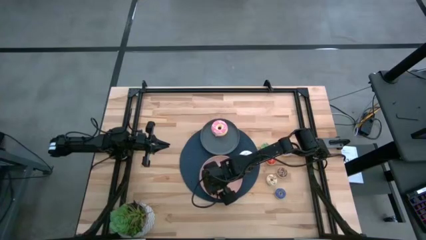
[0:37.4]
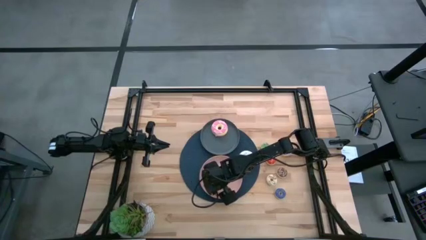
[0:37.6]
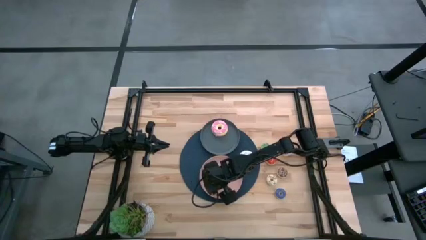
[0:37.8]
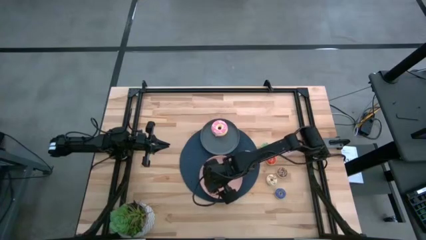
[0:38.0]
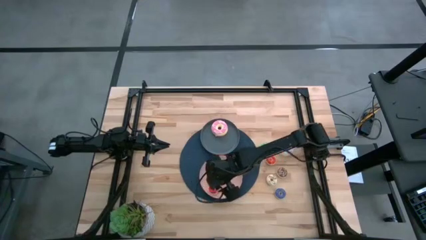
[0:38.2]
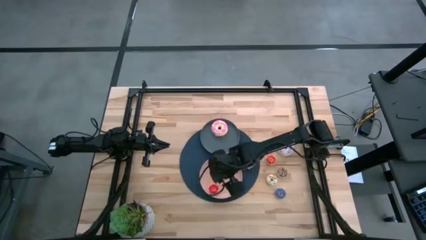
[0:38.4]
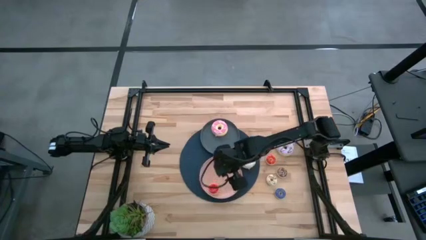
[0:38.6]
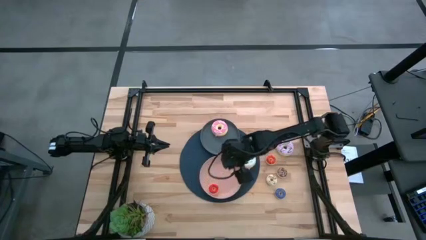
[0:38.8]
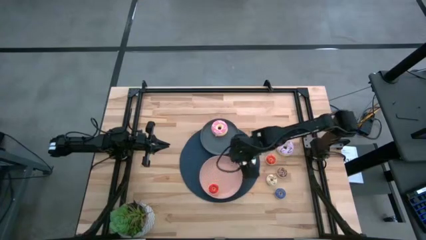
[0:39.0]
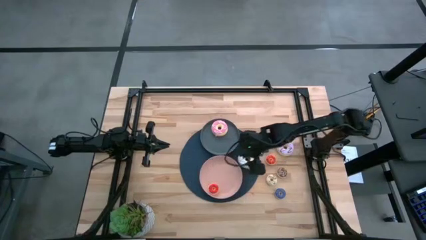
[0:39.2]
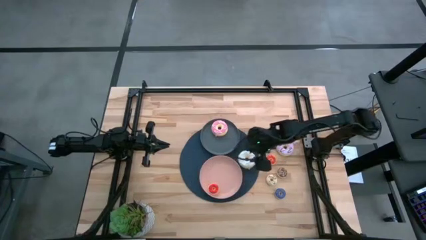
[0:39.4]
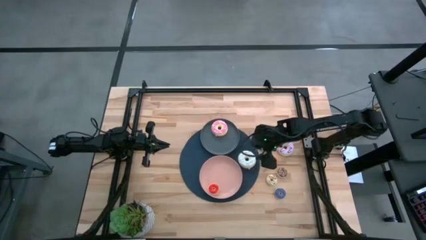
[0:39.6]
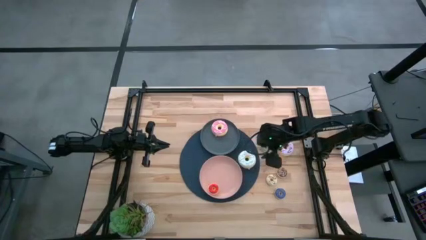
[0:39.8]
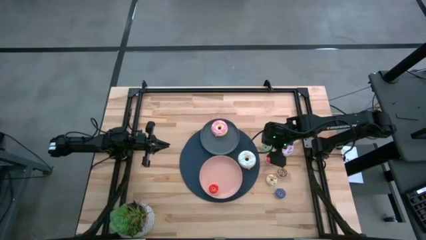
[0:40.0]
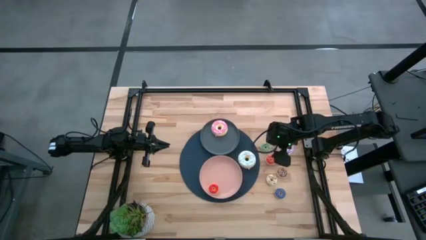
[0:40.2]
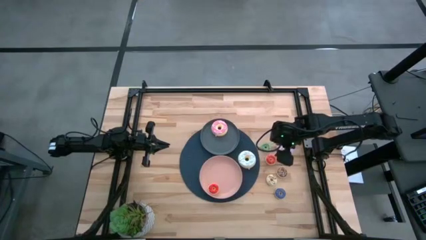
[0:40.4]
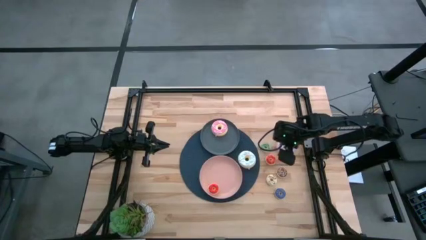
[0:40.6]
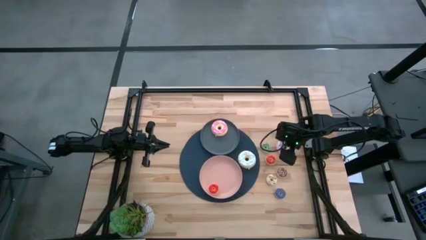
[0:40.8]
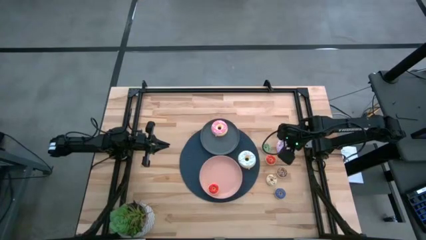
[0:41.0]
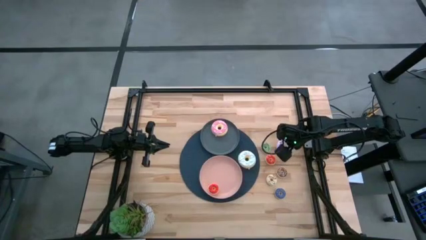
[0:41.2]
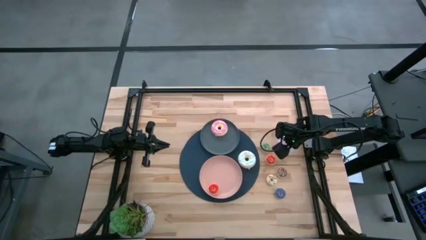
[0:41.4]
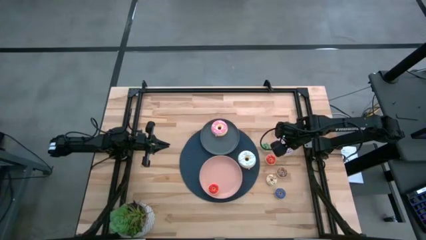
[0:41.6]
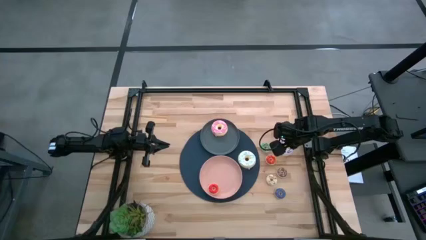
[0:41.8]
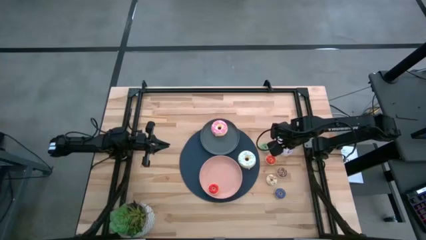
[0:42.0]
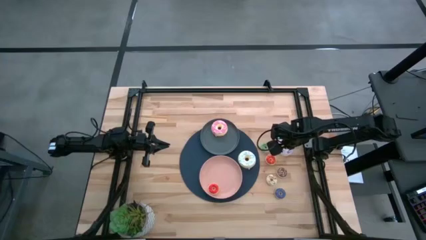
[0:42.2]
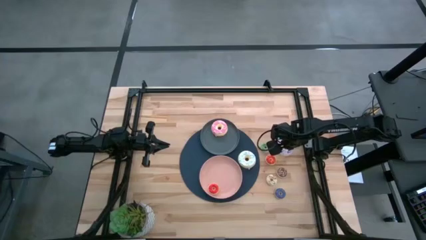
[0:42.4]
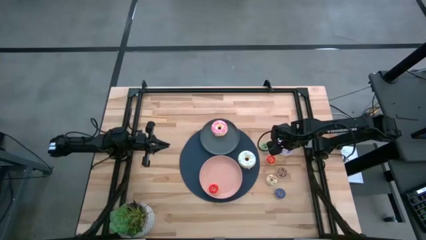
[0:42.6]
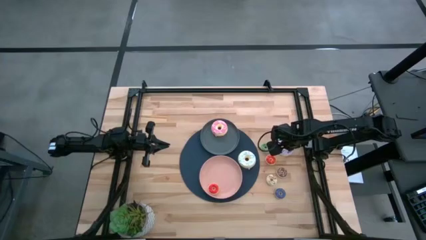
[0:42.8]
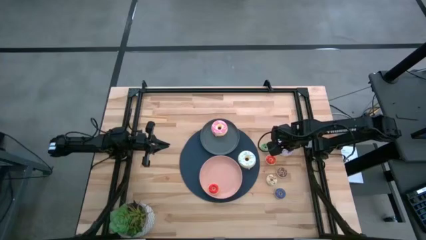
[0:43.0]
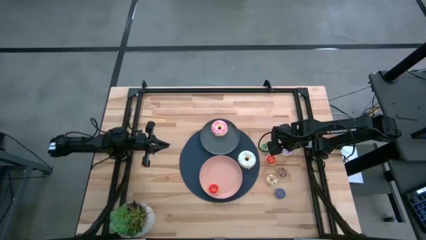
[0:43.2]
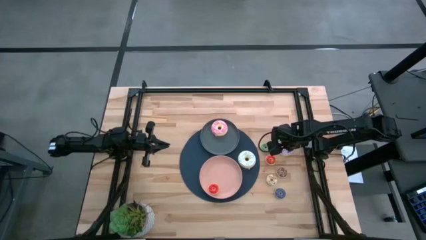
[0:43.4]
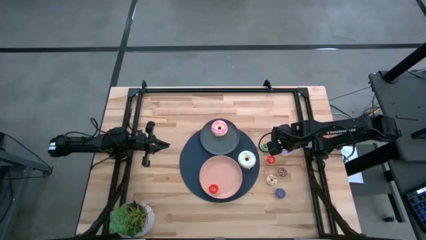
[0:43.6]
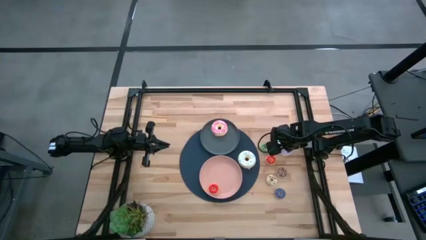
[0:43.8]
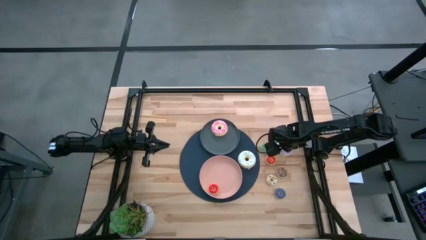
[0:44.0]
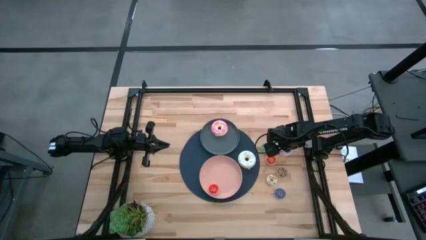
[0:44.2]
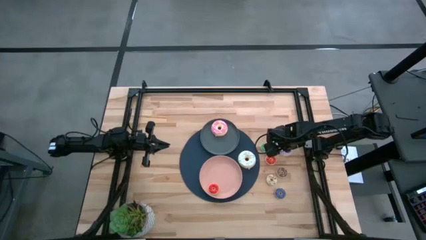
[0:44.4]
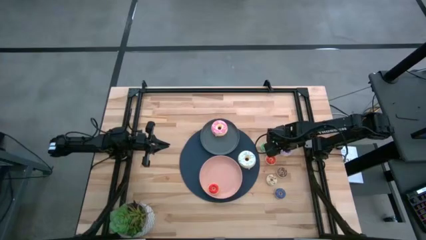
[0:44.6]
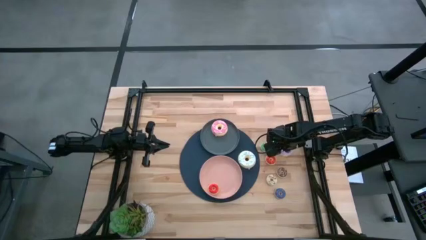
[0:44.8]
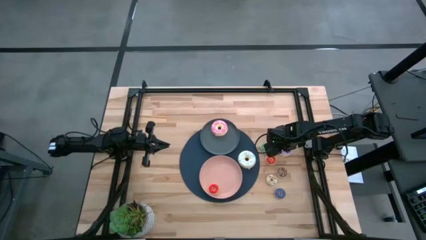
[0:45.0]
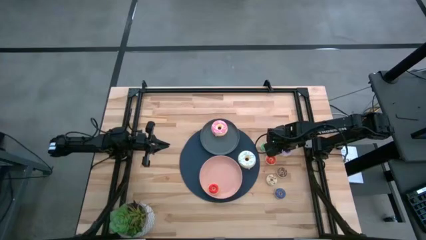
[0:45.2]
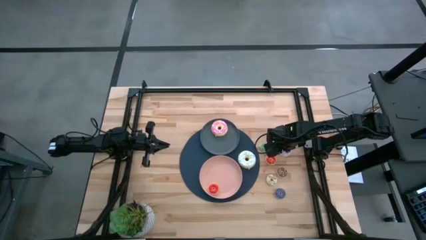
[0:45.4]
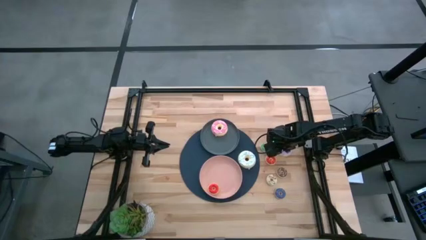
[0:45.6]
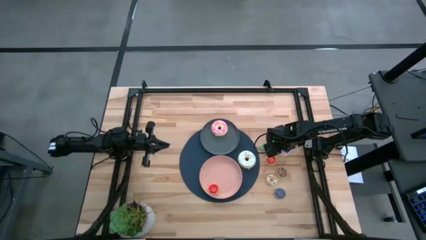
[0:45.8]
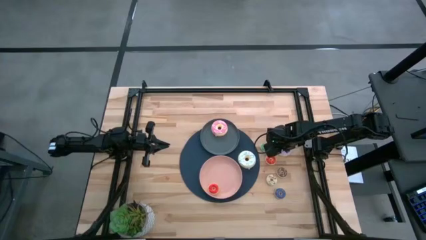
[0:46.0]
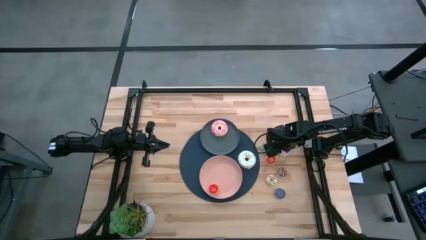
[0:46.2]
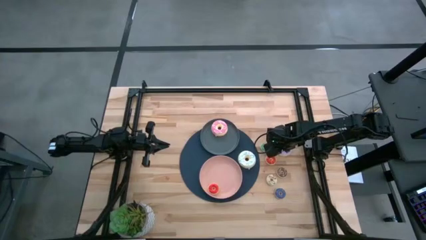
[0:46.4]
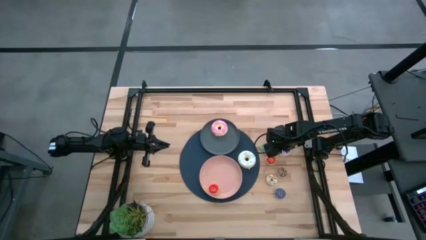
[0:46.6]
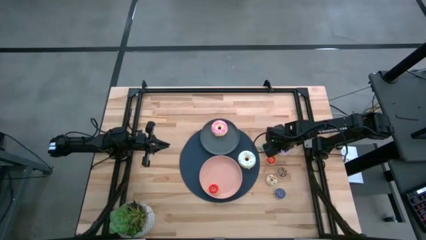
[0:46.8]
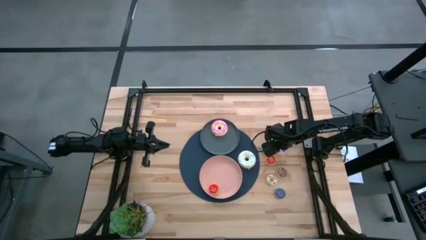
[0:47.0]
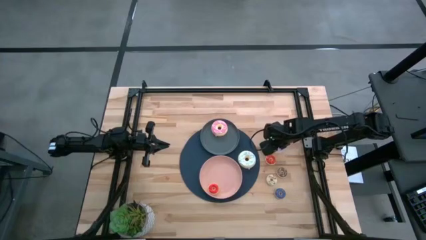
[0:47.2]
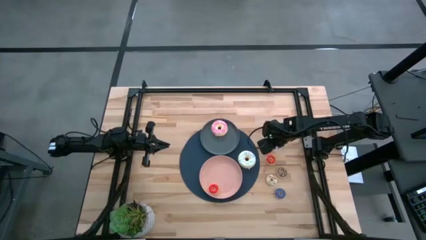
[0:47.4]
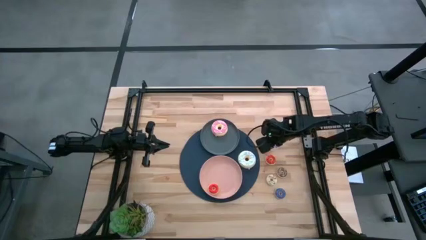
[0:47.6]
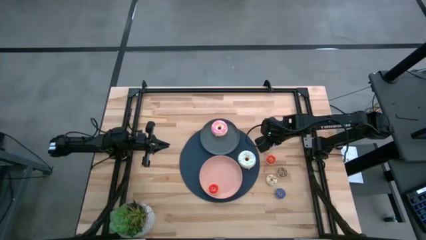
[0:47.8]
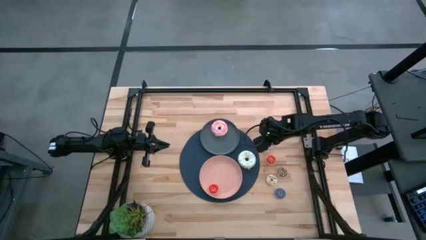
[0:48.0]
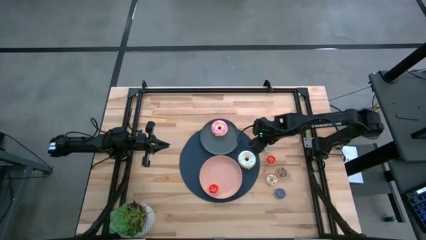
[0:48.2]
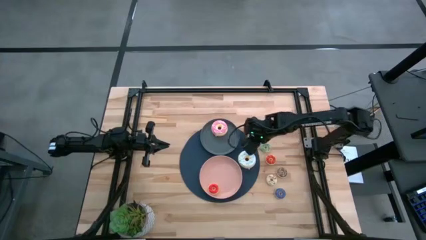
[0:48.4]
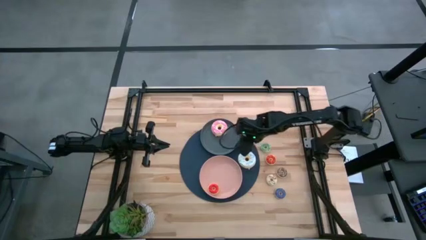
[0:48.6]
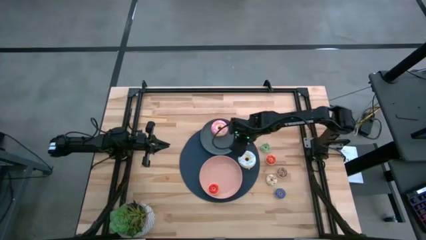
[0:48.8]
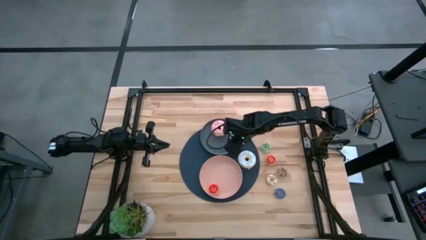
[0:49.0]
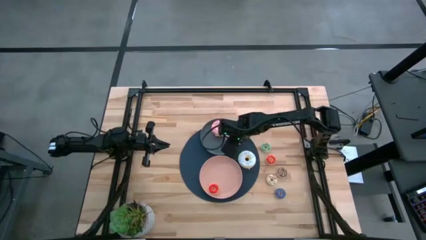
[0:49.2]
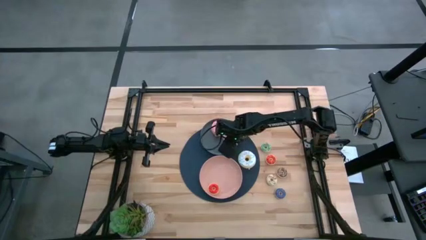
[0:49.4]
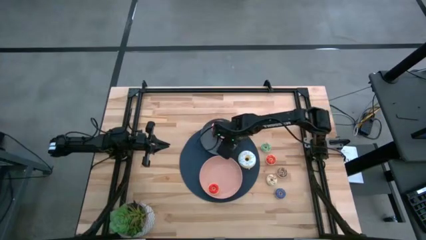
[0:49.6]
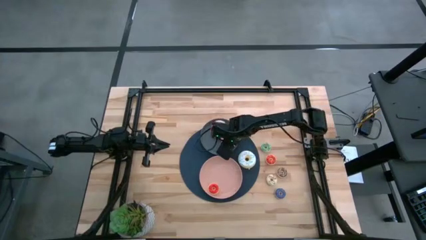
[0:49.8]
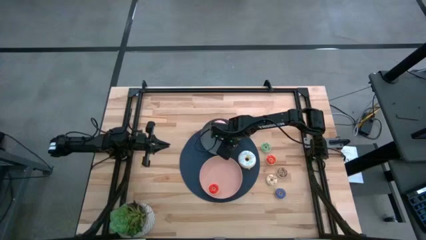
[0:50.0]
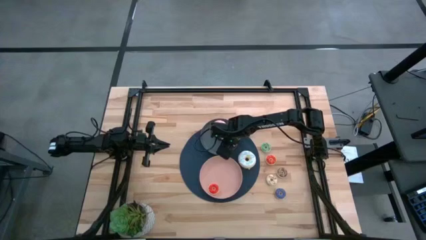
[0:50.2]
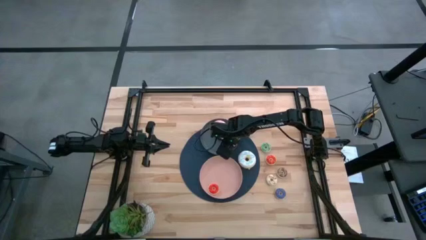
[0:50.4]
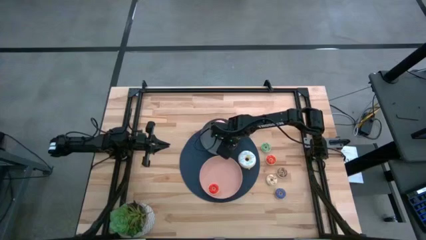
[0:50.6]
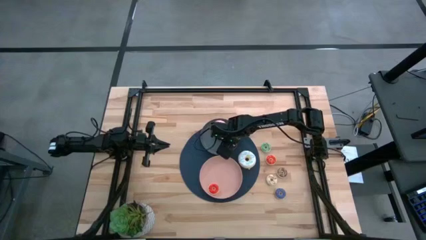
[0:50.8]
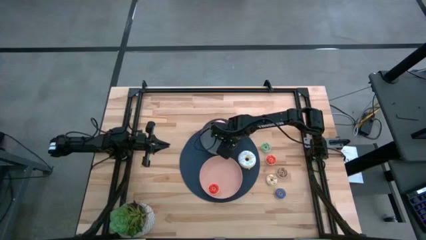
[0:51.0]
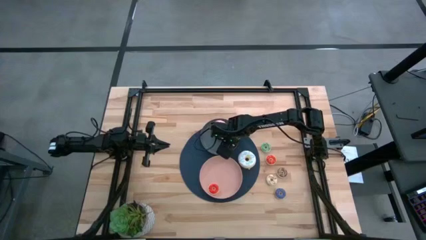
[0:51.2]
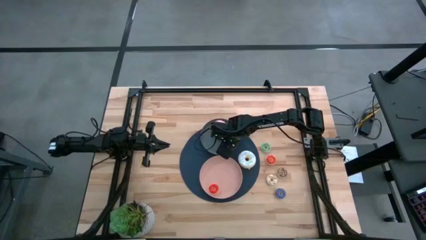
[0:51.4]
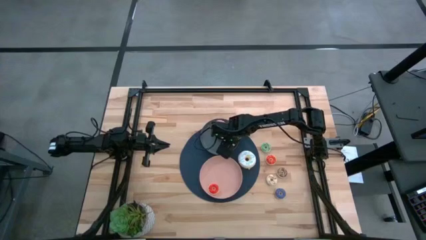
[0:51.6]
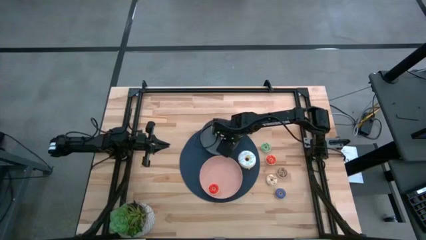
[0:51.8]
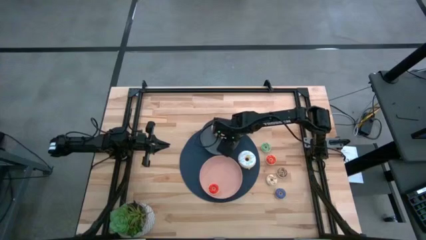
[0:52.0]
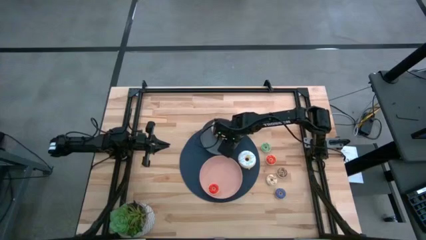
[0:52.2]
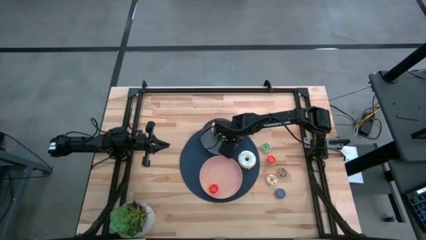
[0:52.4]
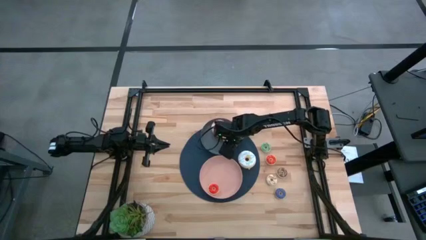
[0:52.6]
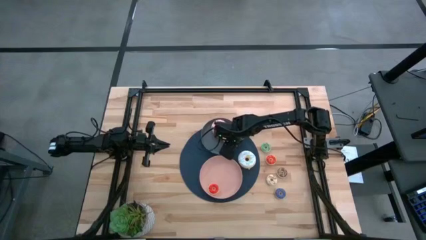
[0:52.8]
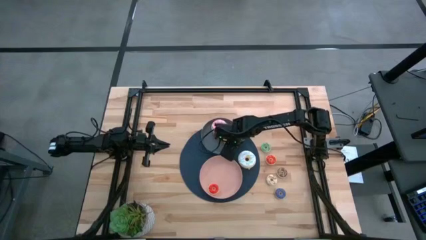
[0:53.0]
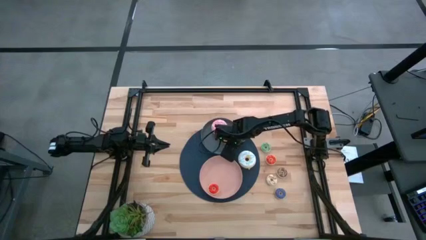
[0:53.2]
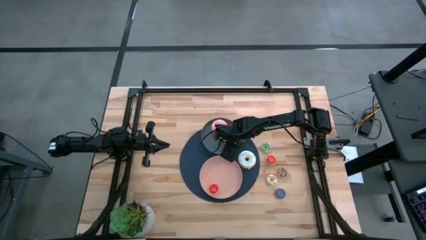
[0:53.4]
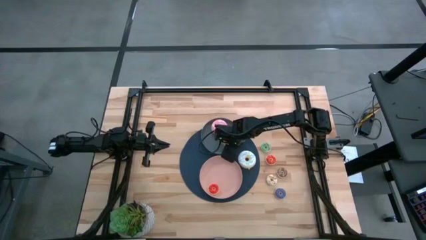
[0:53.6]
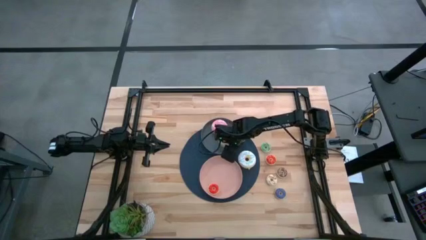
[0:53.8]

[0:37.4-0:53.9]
Task: Pick & Place donuts
Put the big purple doughnut into the gray plate
